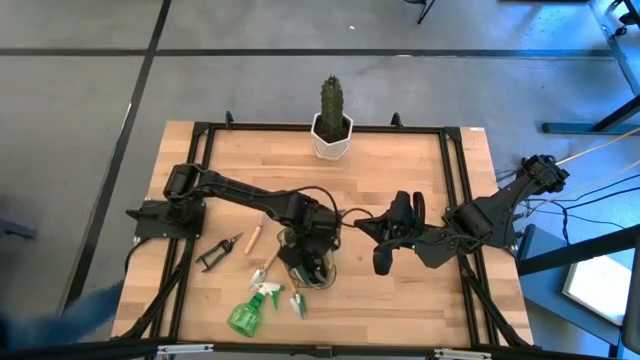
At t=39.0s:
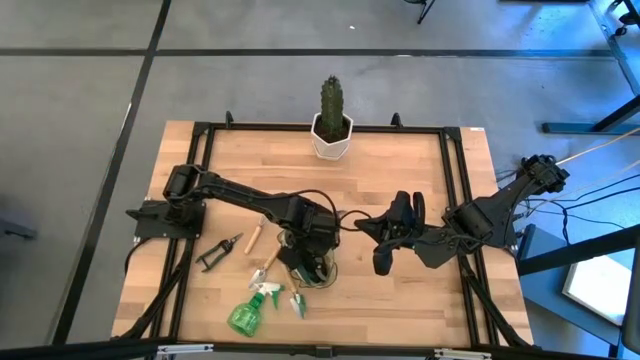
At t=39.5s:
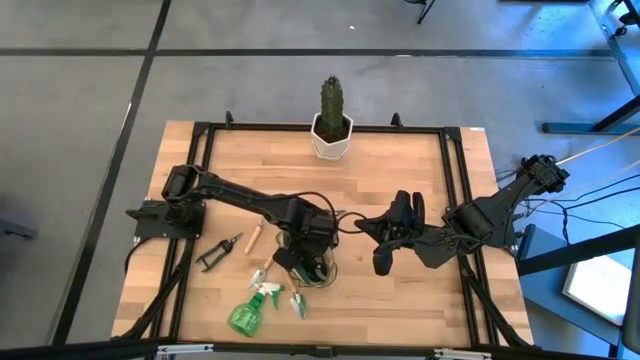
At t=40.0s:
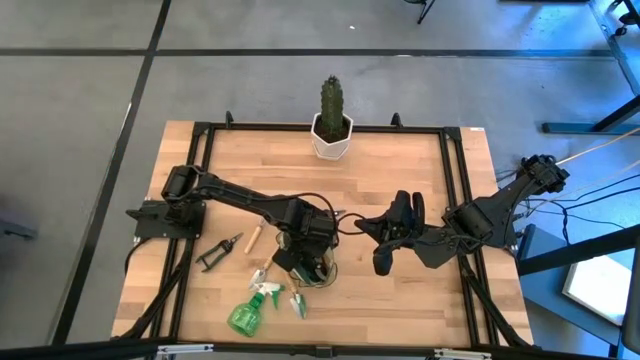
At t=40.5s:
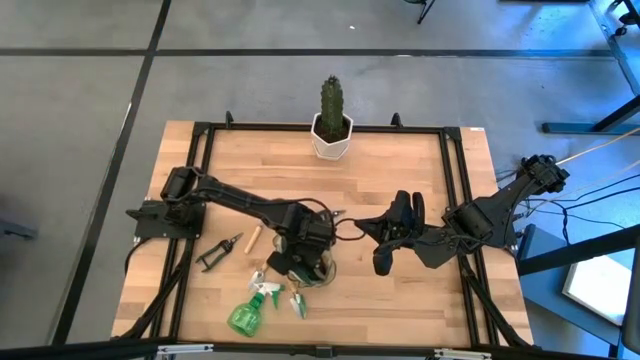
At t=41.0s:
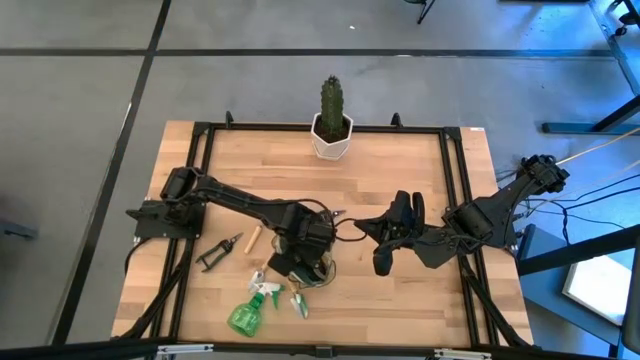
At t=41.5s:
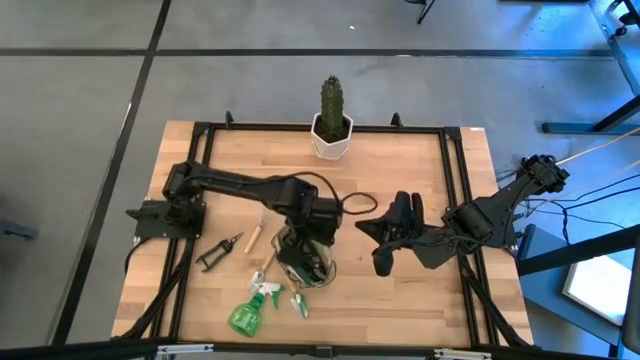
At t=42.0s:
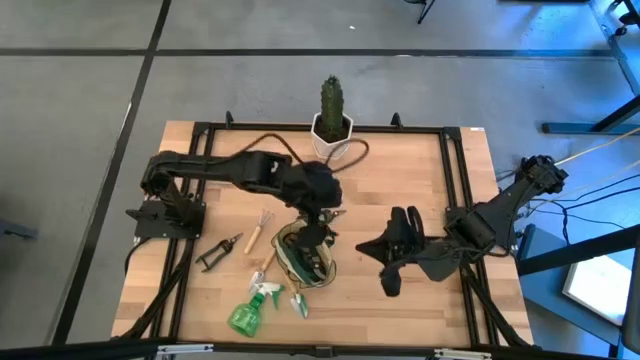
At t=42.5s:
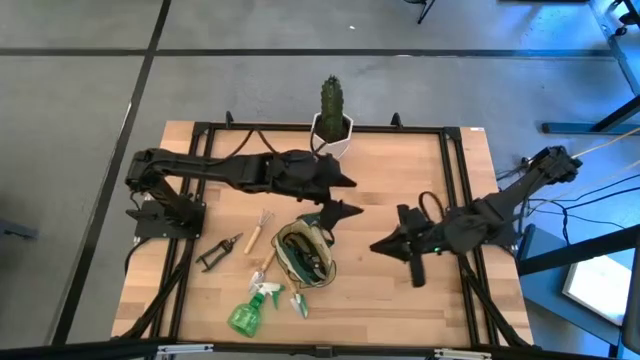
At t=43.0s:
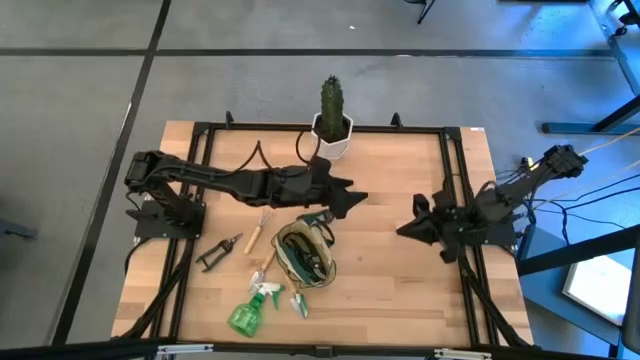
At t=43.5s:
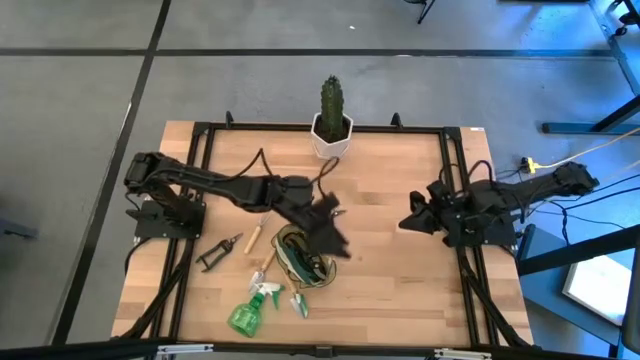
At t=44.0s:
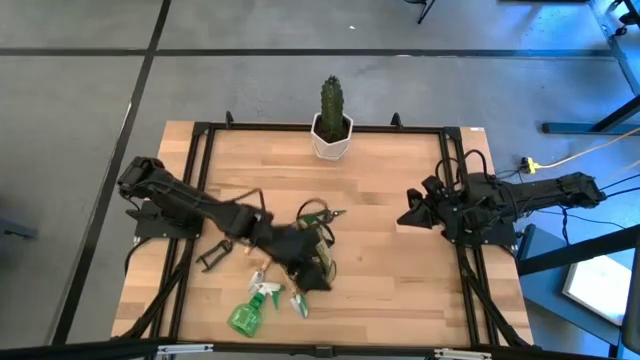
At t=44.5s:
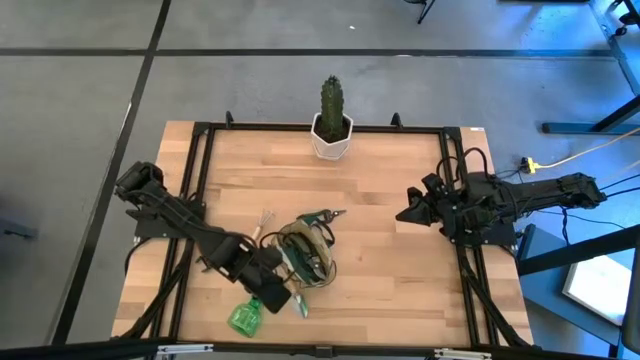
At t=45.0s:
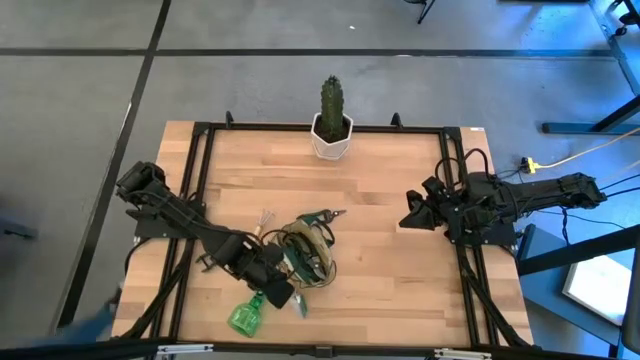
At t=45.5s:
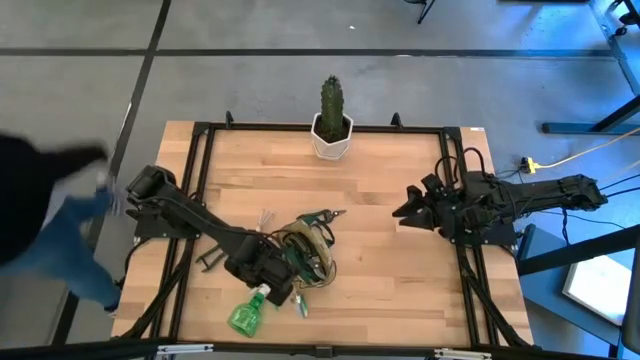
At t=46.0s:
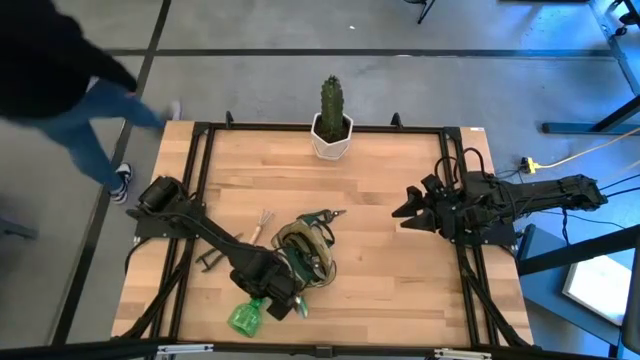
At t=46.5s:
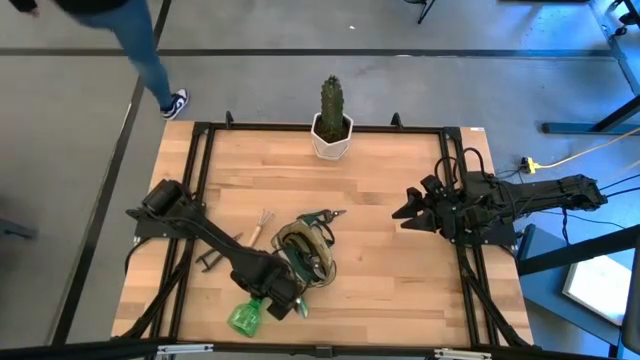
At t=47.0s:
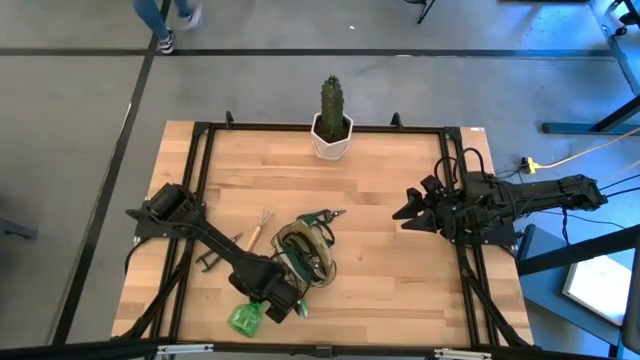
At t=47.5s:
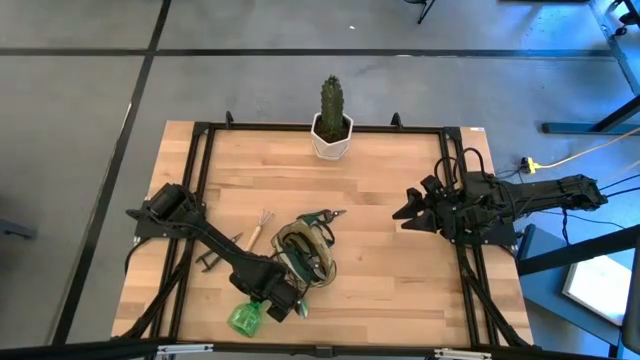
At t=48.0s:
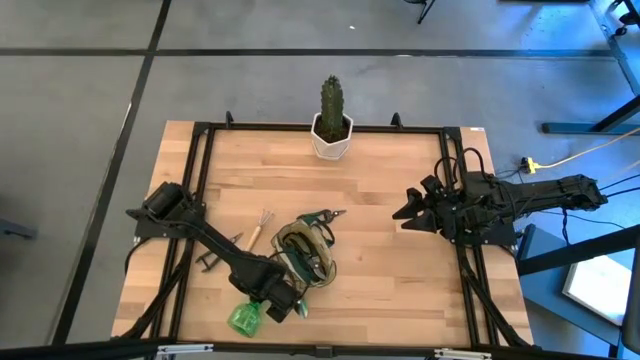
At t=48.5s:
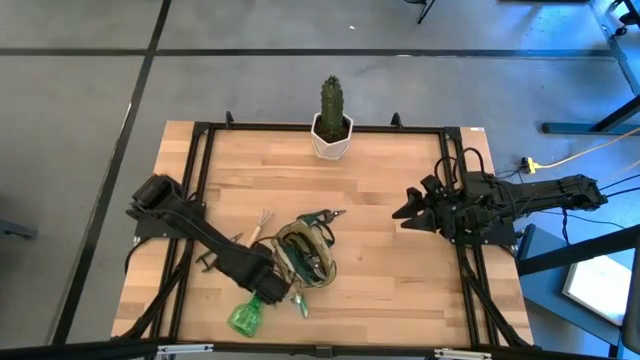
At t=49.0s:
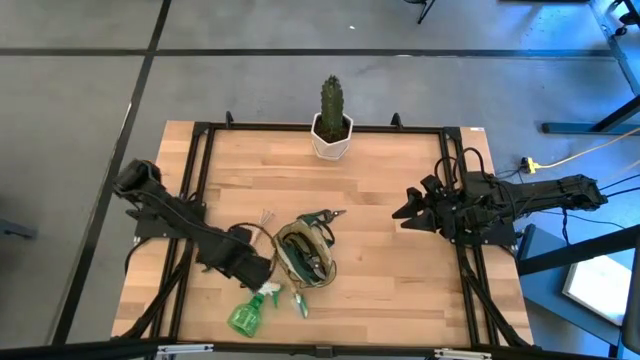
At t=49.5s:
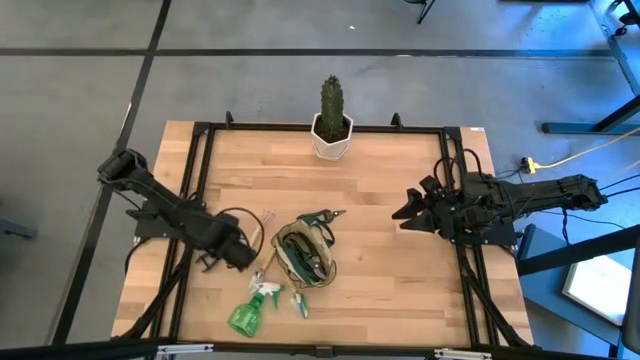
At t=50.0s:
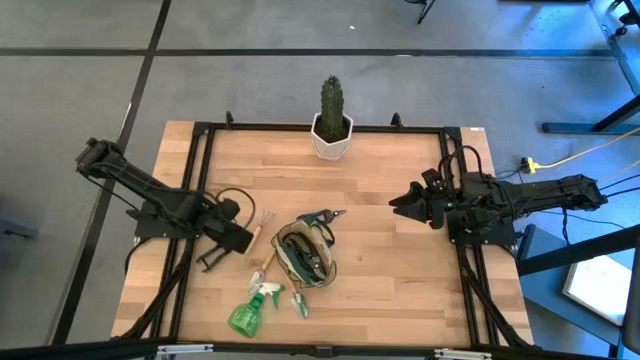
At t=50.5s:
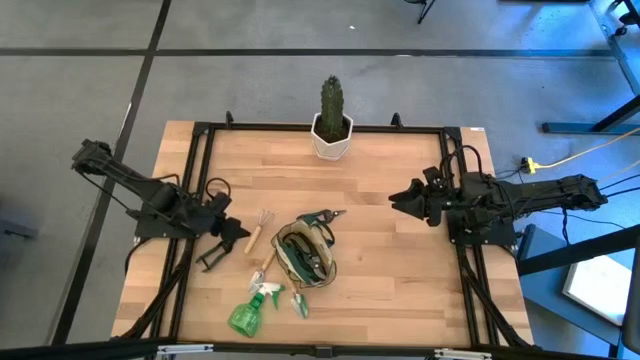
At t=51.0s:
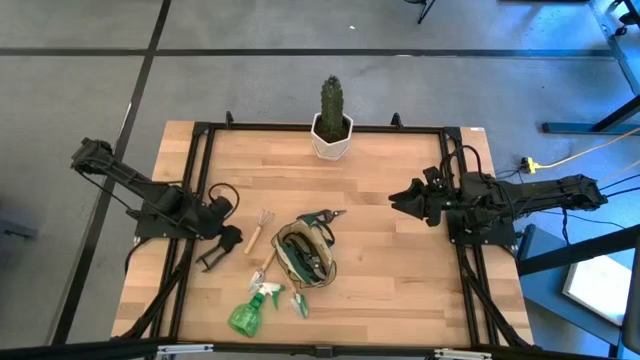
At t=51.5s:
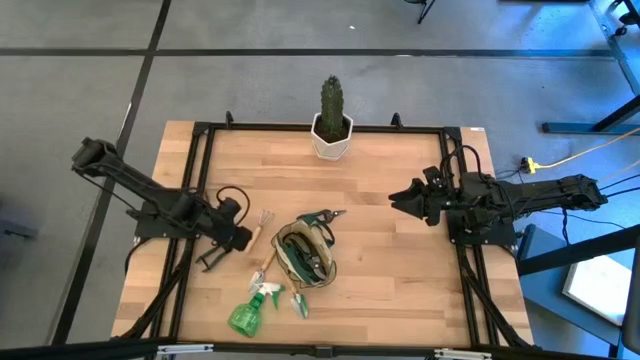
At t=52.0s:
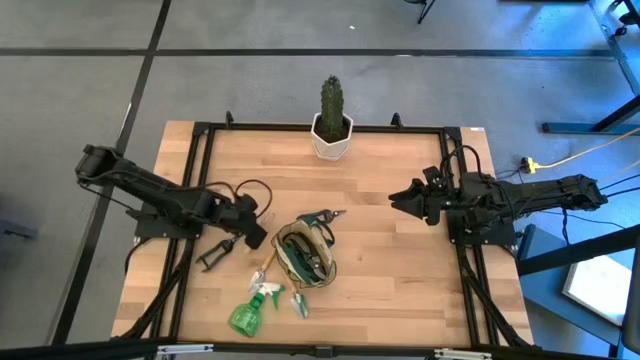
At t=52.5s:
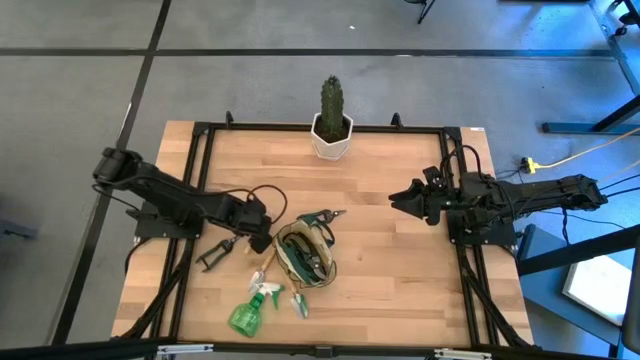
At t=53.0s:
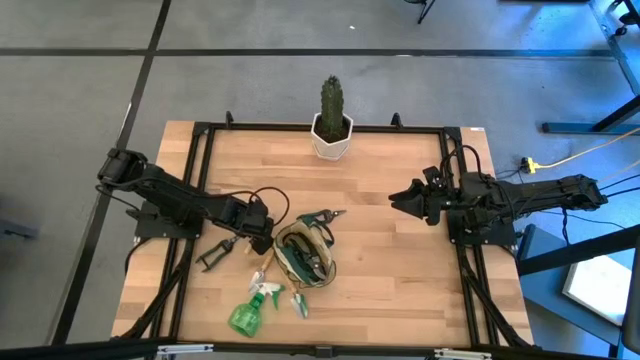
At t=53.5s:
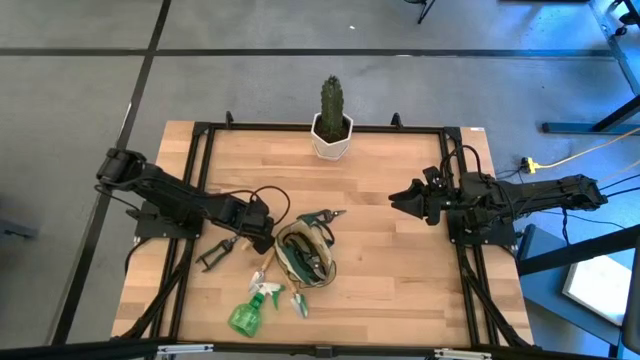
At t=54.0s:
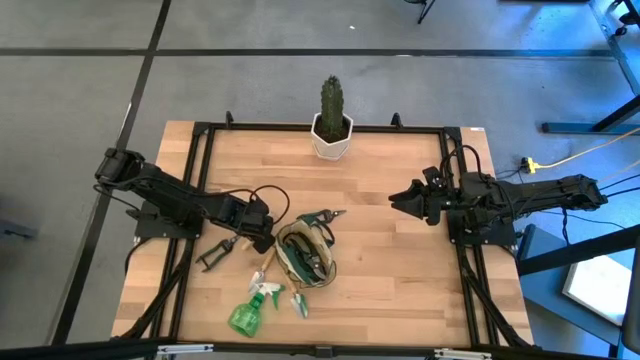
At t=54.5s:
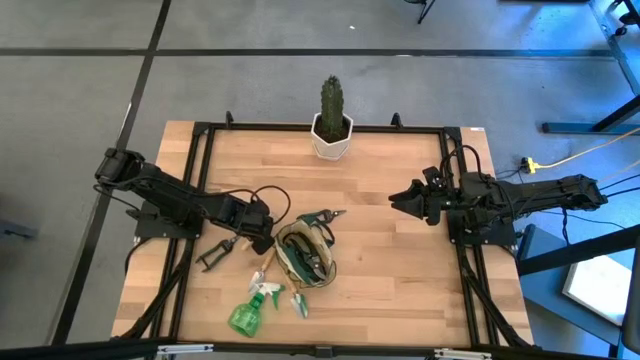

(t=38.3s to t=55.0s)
Task: Pick & Place Garden tools in Gardening bag
Put the brown hand rake into the green gardening bag

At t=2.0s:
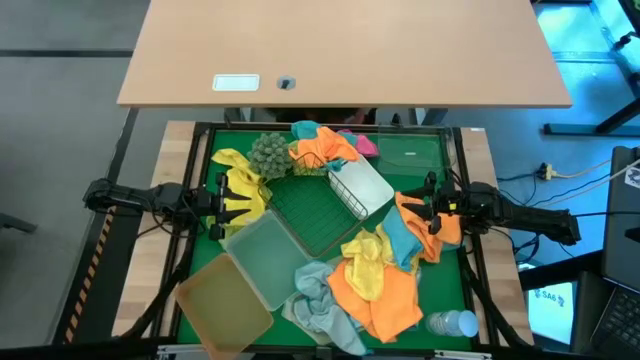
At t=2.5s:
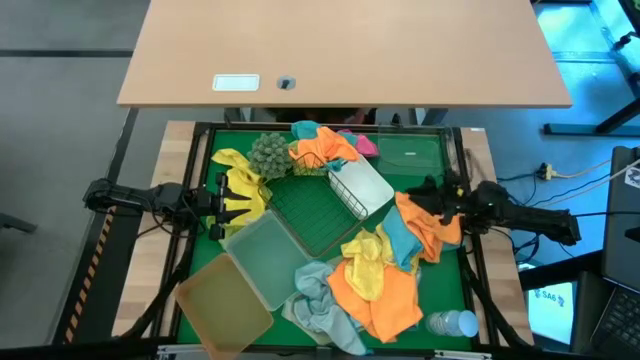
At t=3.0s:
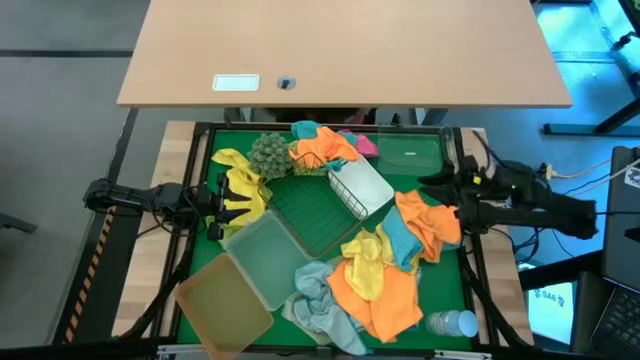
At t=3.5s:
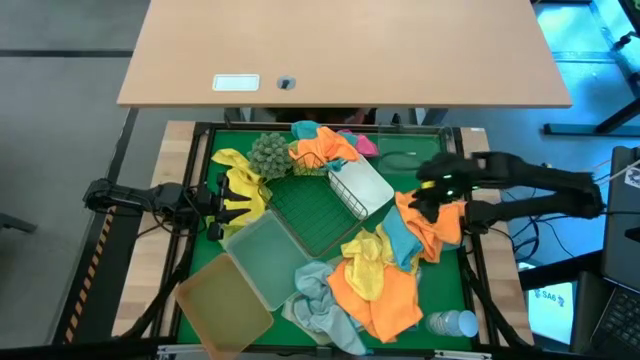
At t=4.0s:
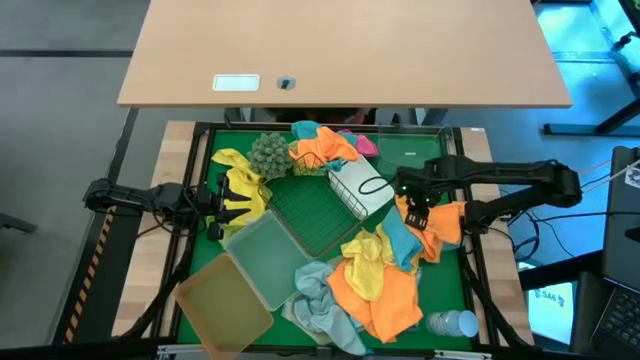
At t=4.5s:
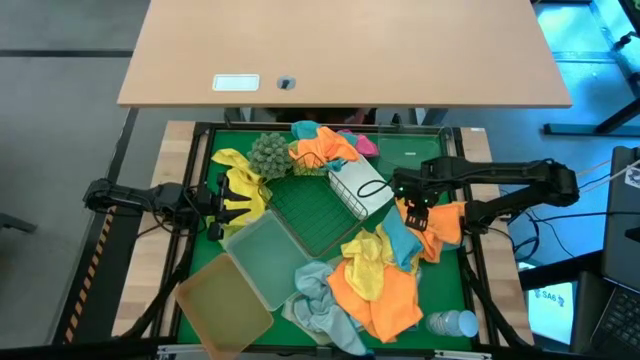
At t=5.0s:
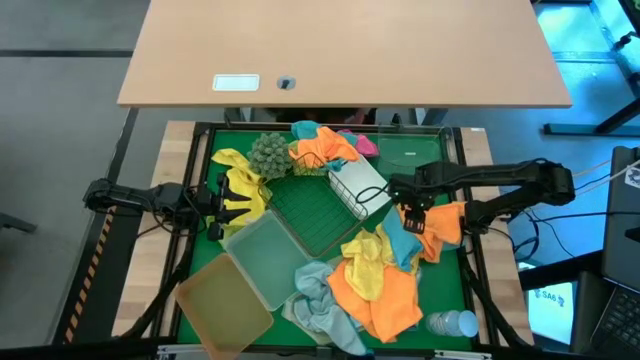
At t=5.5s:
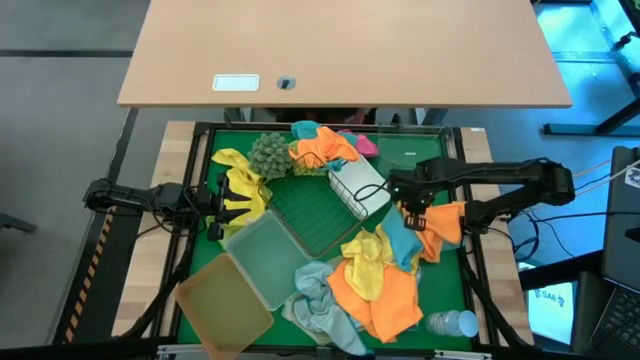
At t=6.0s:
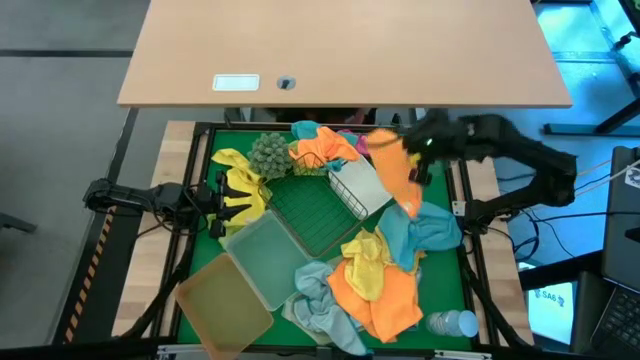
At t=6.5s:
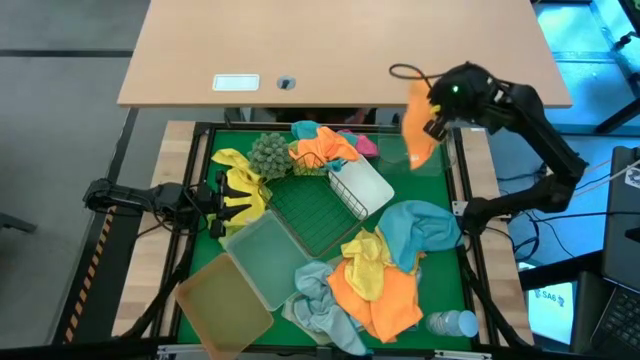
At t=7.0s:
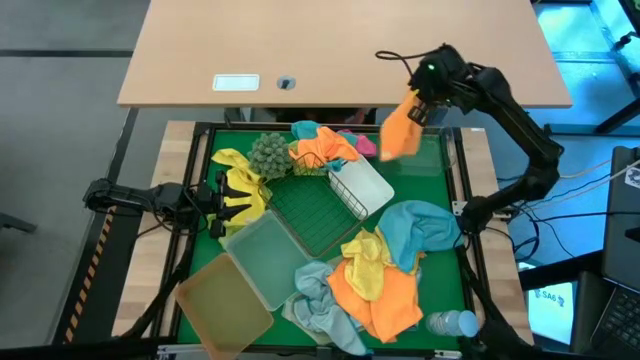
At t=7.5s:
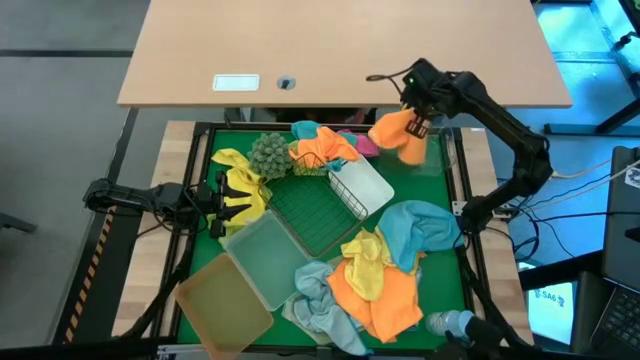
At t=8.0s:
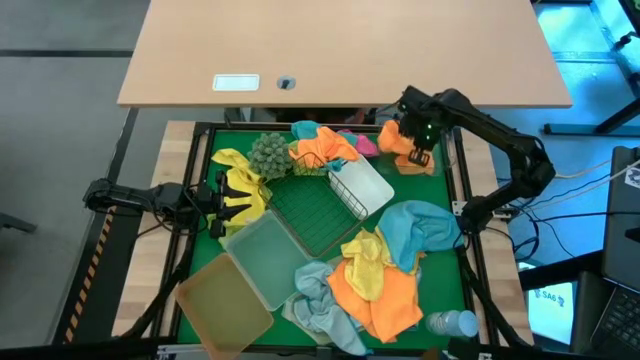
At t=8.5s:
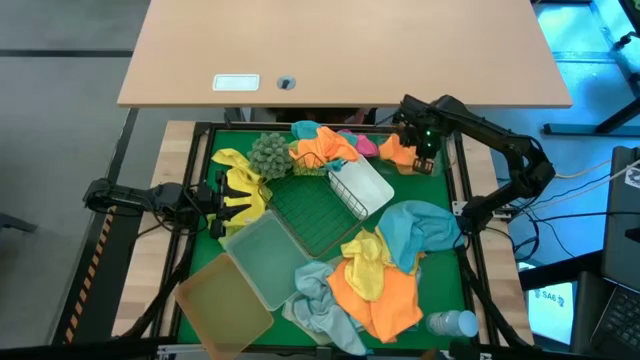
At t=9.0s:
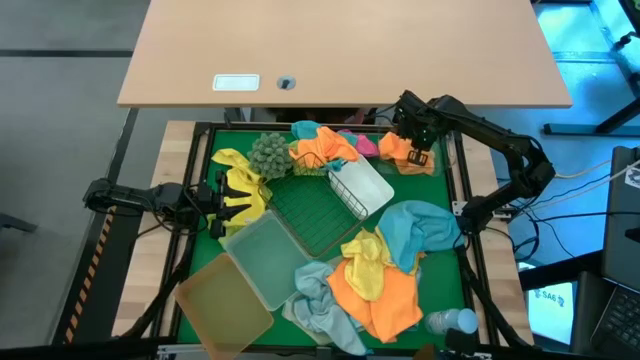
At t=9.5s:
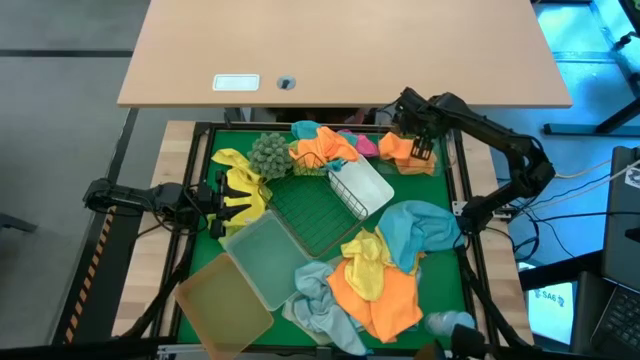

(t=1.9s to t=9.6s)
Task: Sort microfiber towel by color & place in baskets
Put the orange towel into the transparent bin
